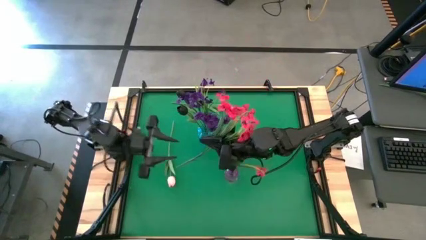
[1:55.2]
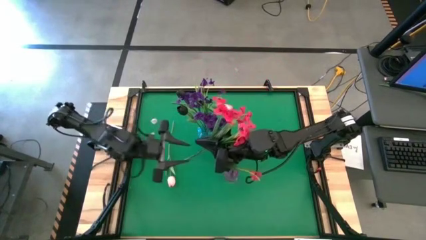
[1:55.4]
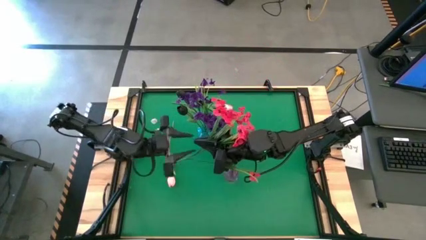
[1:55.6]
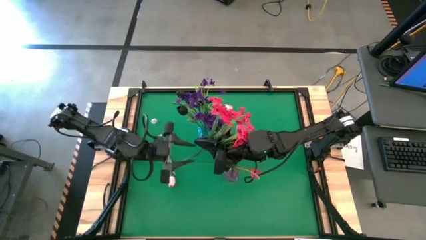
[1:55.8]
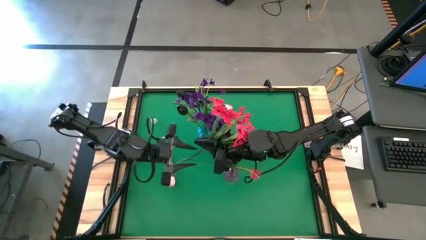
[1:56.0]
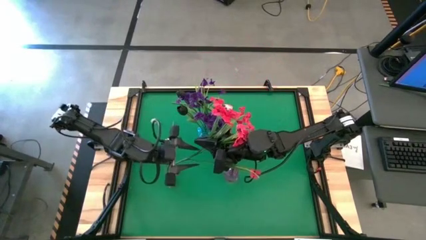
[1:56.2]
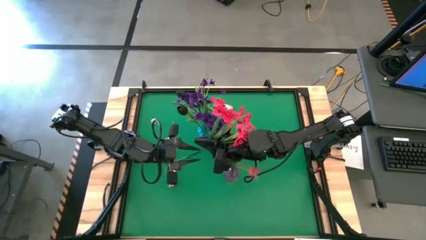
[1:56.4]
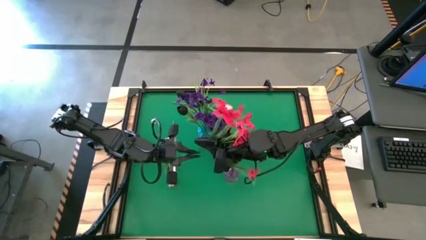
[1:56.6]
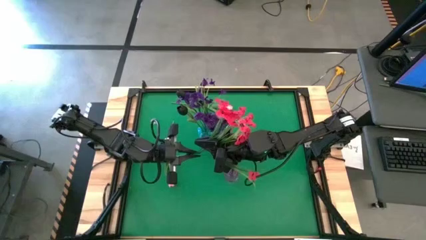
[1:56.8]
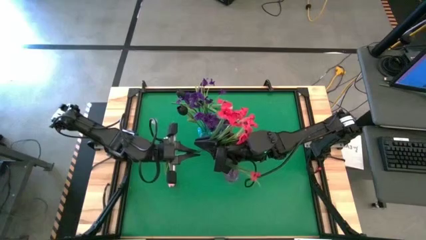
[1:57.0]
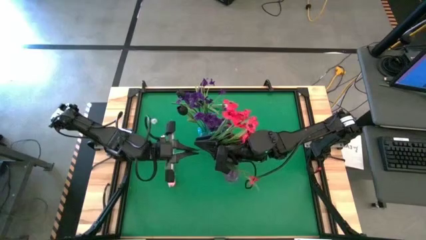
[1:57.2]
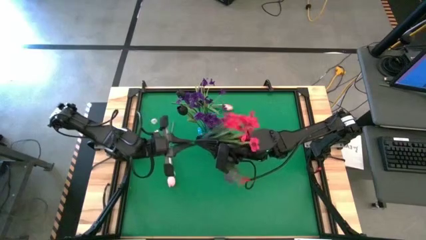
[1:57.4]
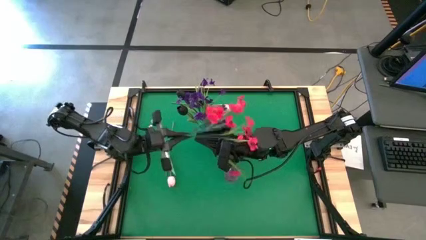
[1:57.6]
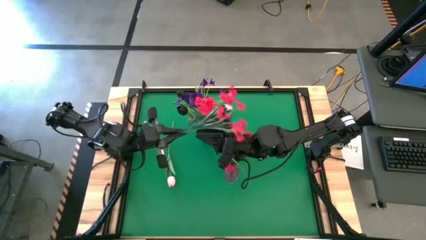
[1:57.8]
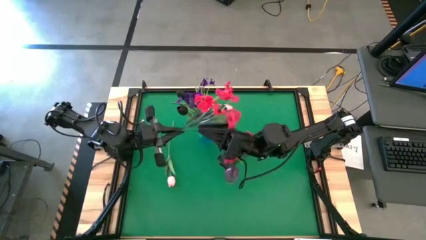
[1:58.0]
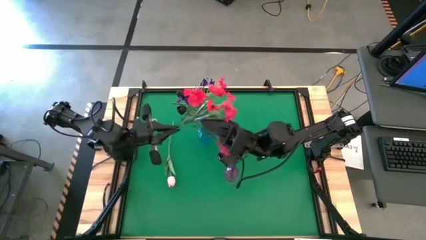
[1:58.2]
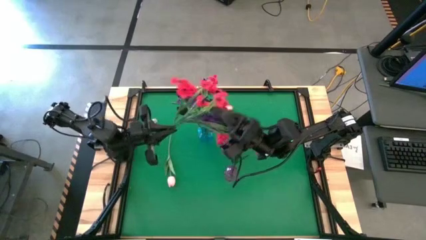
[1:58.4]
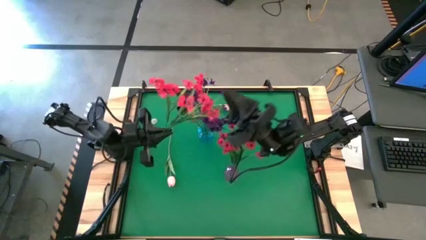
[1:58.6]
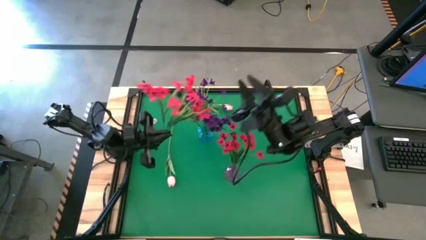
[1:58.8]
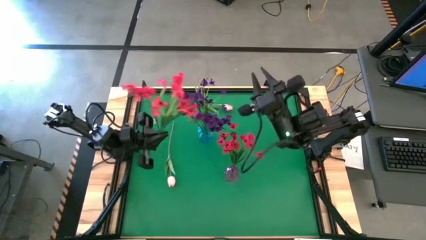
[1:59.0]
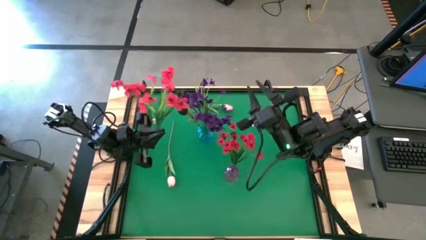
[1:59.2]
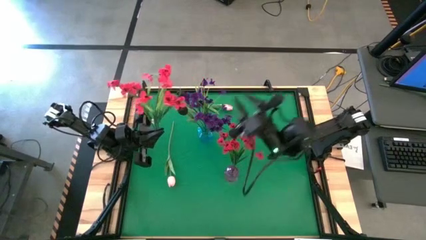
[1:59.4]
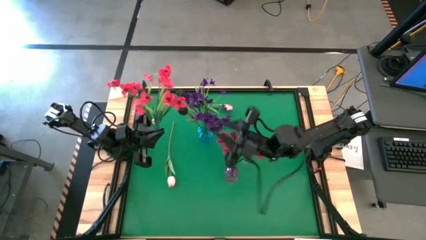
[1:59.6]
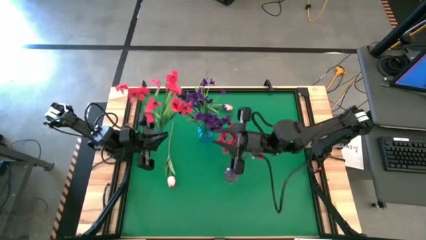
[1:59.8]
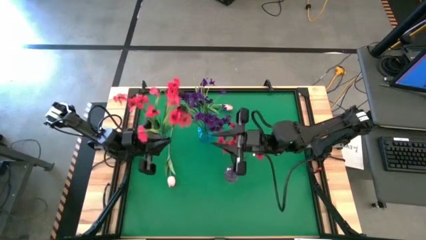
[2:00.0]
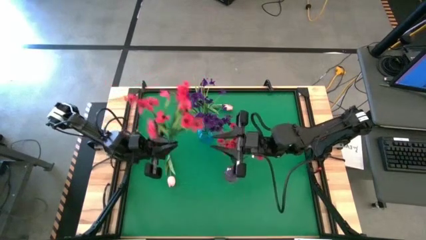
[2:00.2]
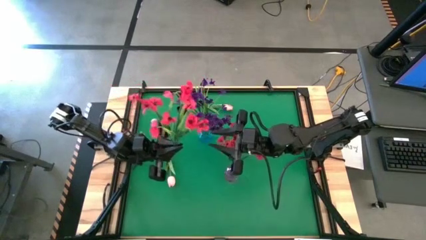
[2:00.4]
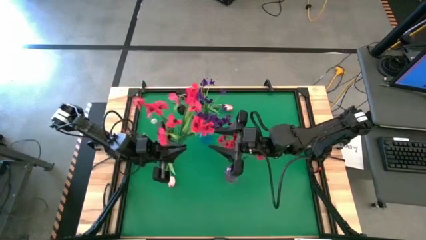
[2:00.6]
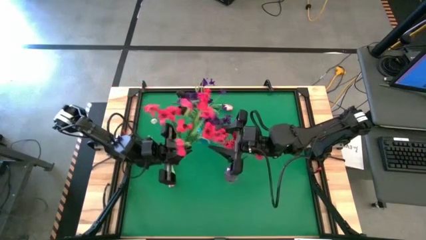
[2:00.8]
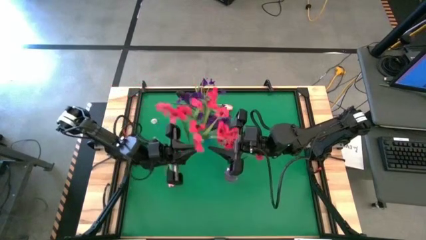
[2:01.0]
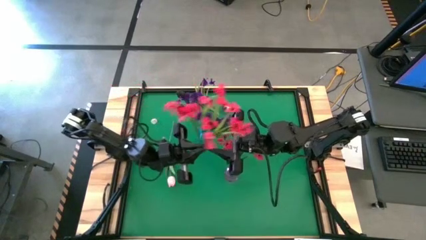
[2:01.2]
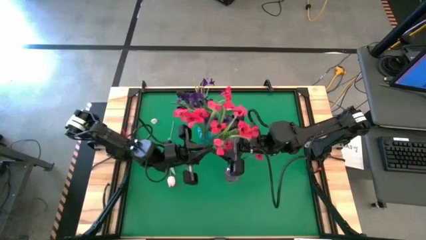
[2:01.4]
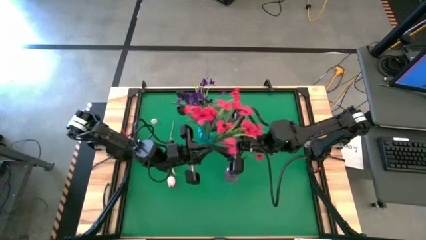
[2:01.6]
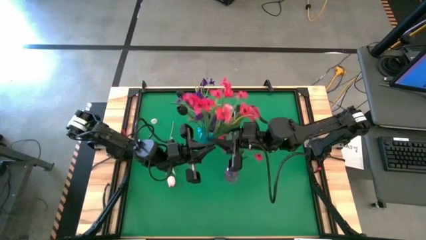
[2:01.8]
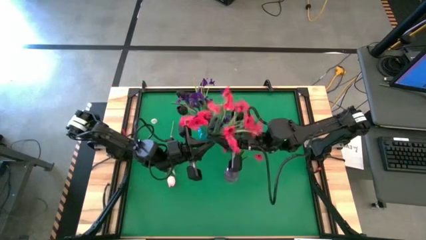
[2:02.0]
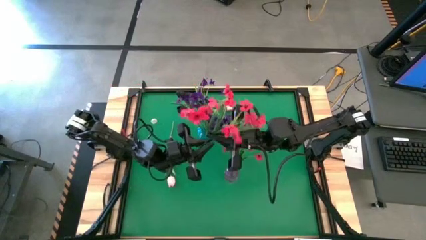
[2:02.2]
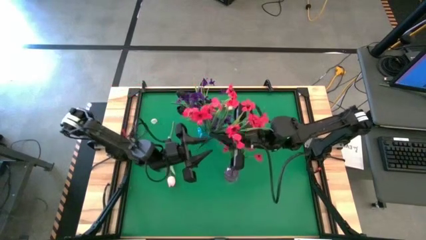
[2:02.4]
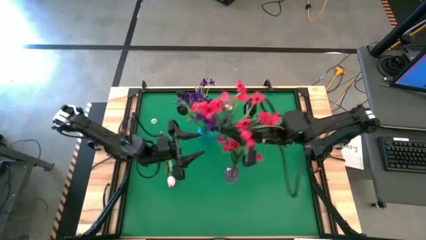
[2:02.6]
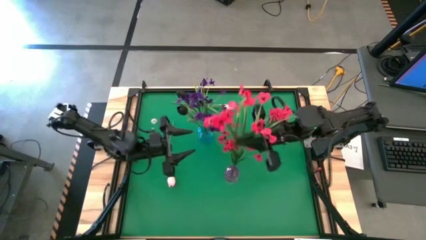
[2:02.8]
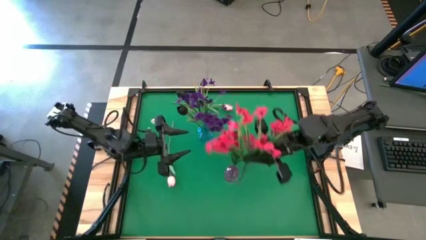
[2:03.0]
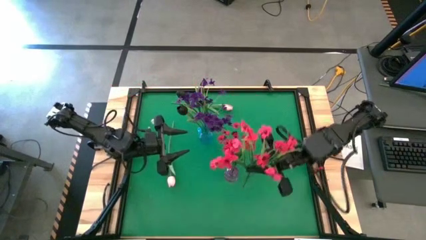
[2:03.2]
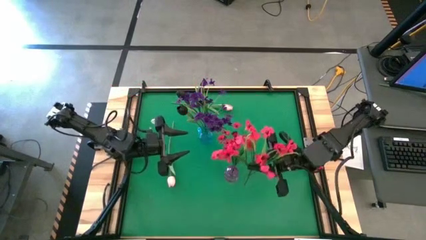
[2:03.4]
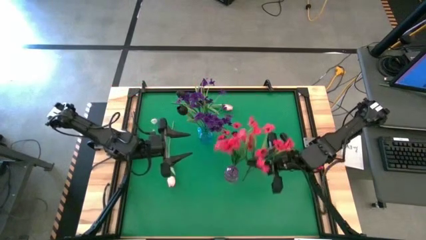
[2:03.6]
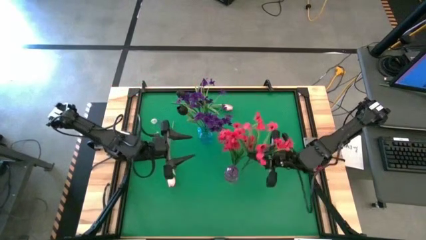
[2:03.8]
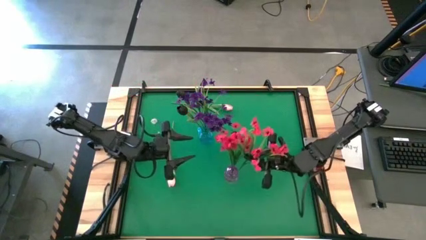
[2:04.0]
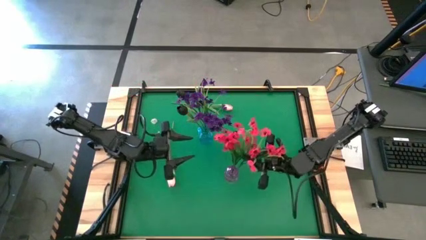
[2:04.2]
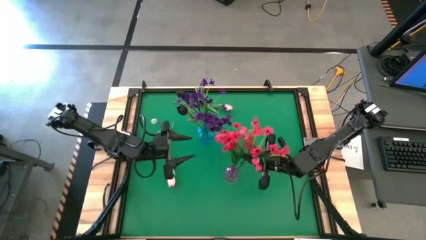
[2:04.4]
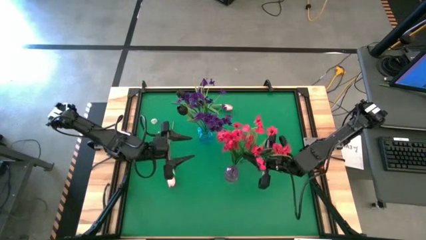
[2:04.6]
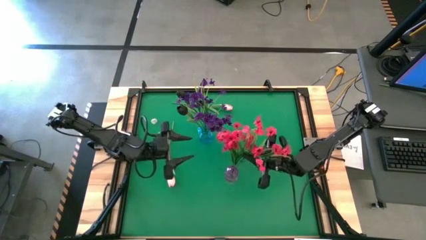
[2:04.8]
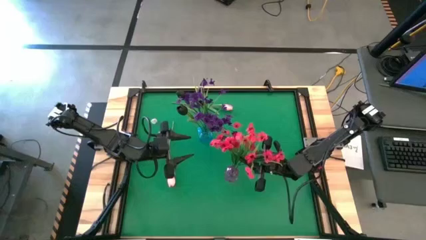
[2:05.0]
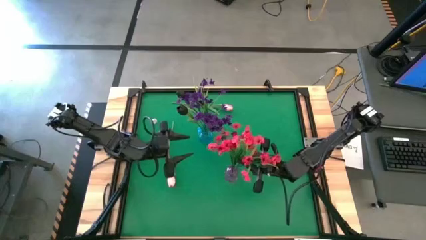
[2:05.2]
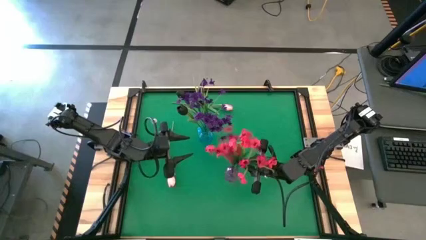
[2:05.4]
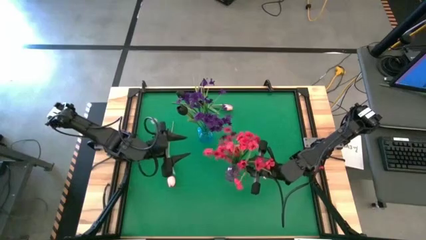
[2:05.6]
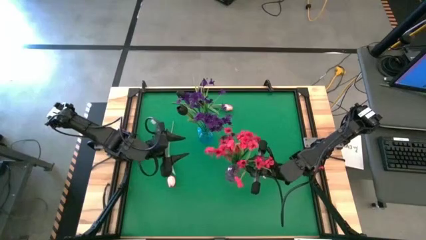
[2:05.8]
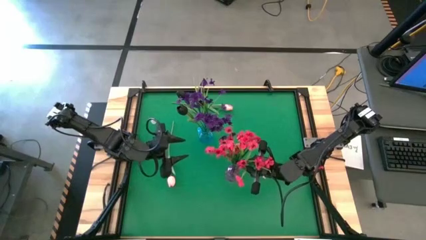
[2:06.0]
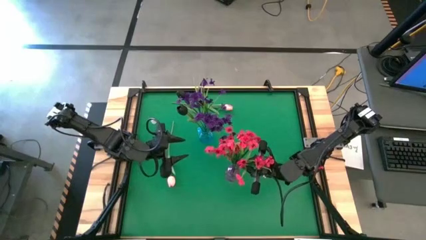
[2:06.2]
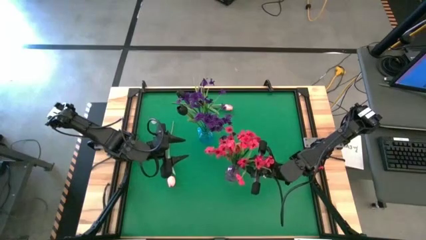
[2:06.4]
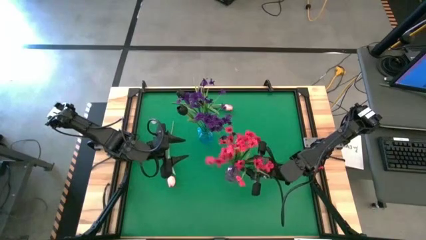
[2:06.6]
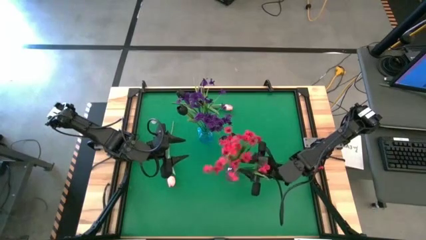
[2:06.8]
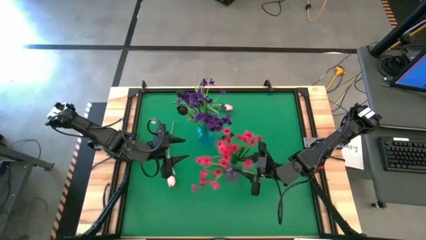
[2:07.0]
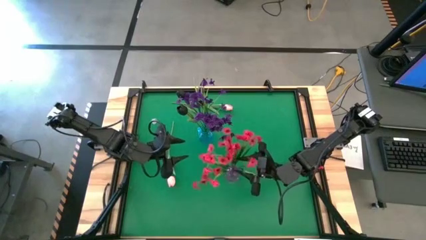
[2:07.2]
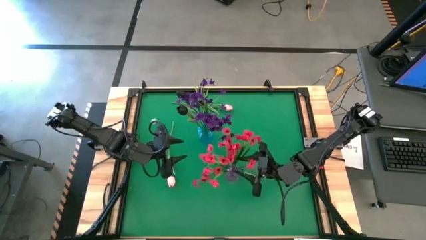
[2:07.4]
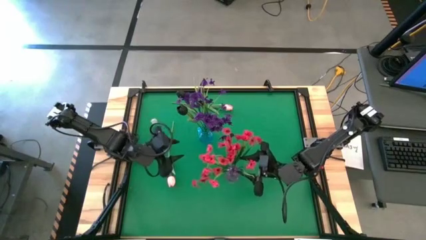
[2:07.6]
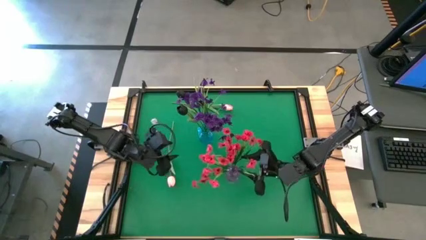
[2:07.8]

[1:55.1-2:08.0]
Task: Sort flowers into vase by color
Put the pink flowers into the purple vase

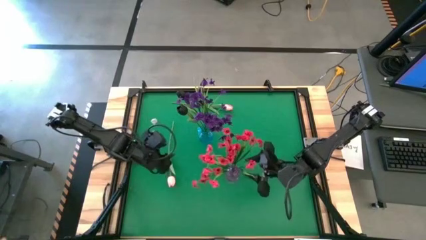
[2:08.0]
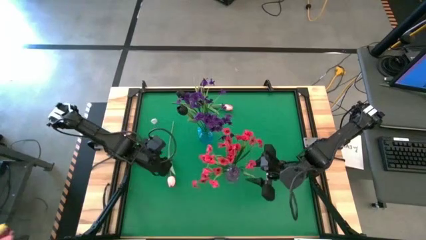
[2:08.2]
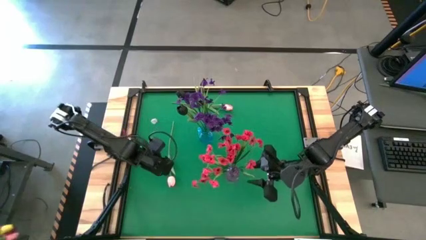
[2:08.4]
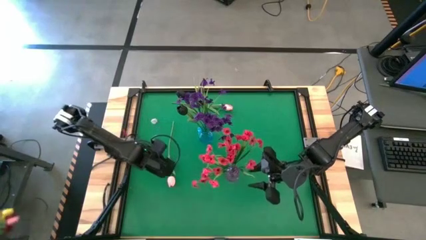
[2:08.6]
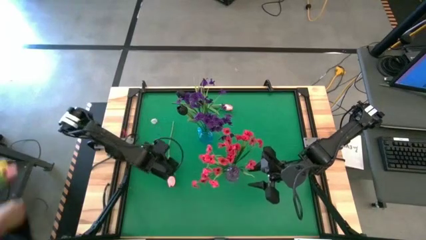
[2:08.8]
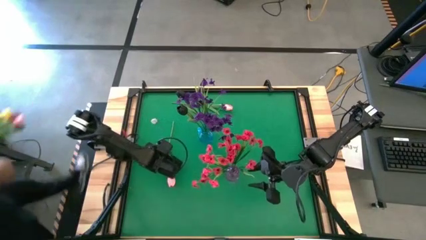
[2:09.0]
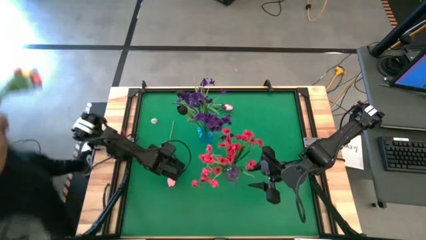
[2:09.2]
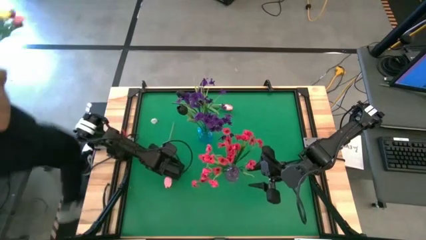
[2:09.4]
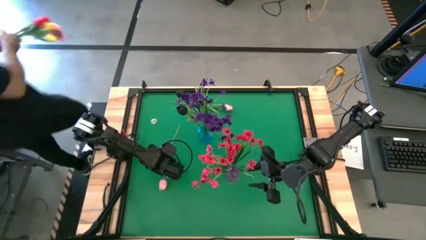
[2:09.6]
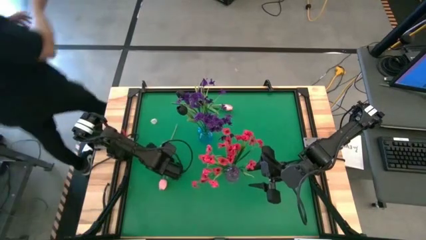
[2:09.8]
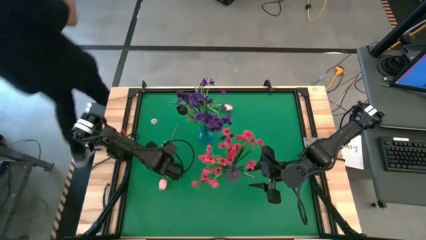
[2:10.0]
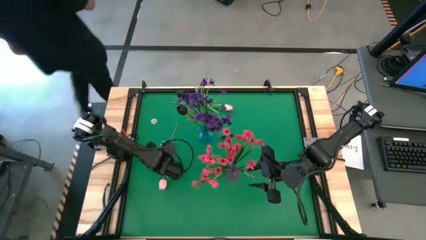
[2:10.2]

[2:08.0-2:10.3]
Put the bottom pink tulip into the purple vase

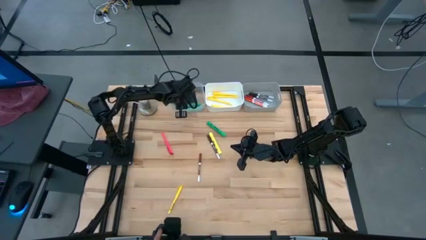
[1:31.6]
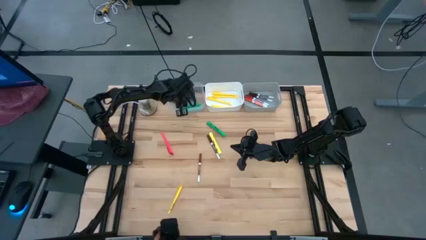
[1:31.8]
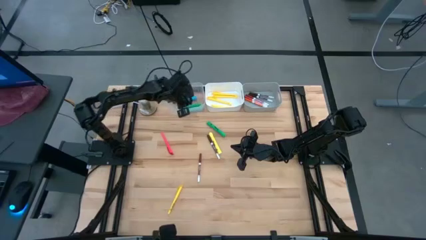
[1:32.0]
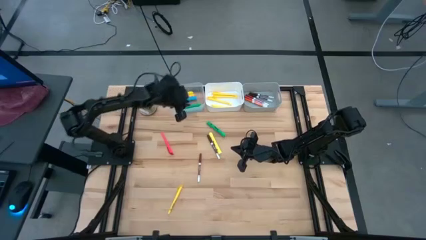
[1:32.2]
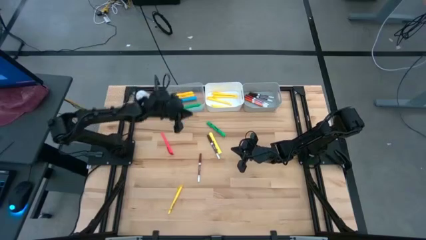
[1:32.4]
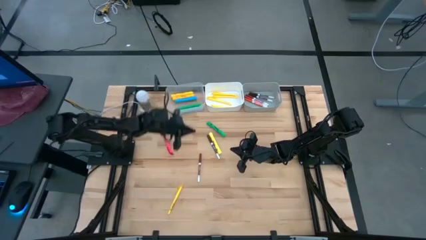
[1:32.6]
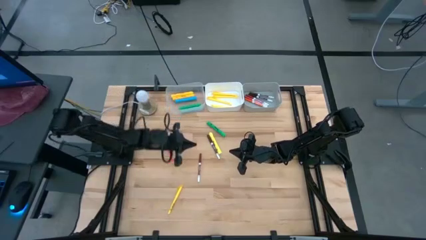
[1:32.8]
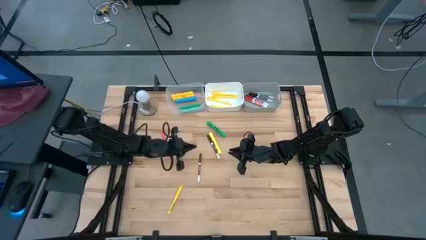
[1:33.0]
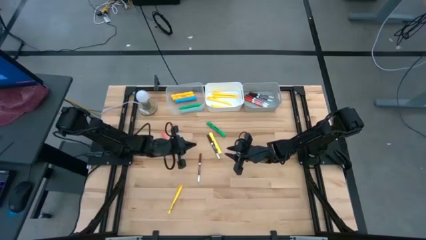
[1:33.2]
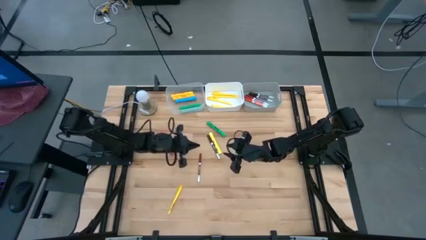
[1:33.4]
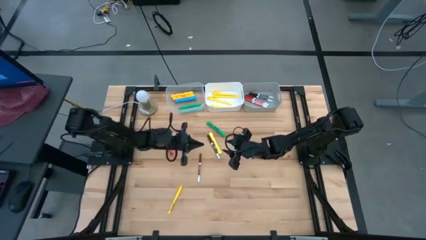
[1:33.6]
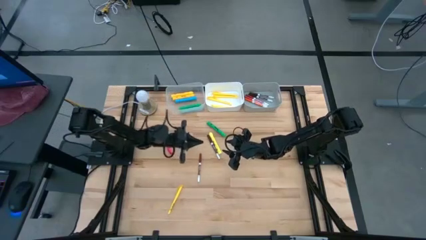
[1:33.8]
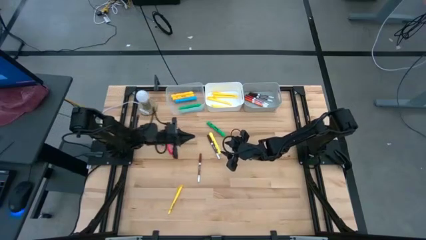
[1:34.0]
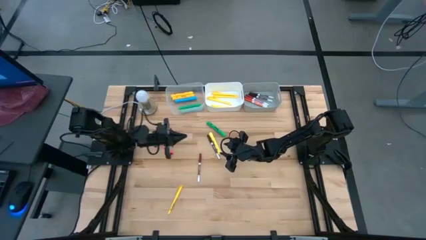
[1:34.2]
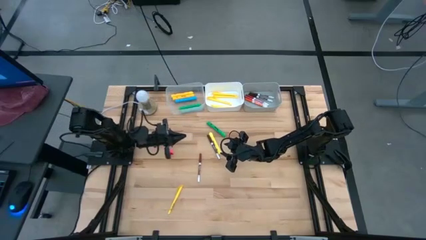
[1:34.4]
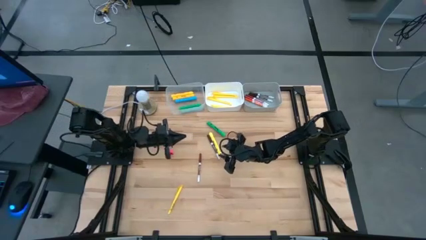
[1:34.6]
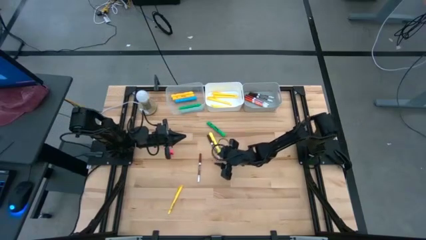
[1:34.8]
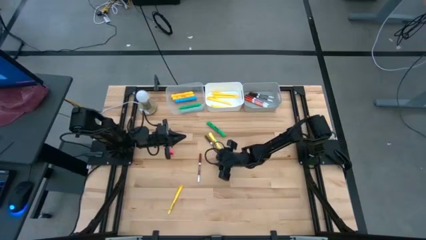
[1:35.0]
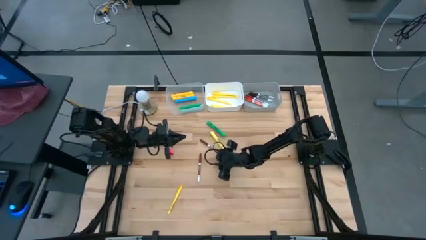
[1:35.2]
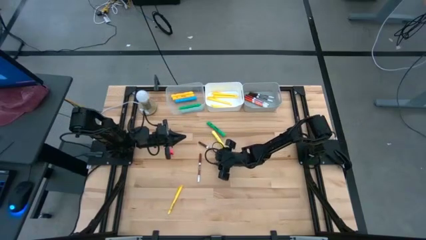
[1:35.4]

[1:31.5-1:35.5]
Task: Pick & Place Markers
Put the dark brown marker pen into the gray bin
